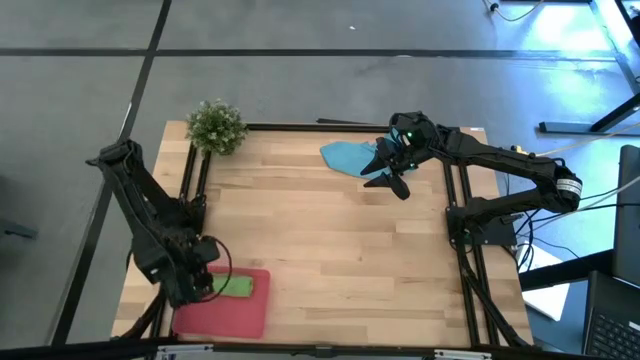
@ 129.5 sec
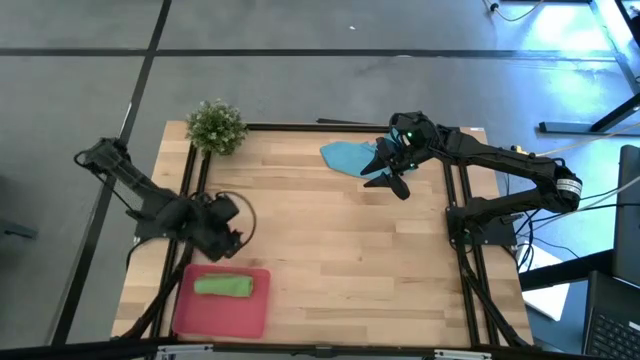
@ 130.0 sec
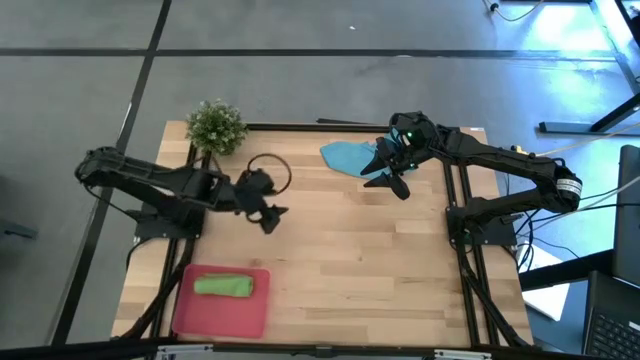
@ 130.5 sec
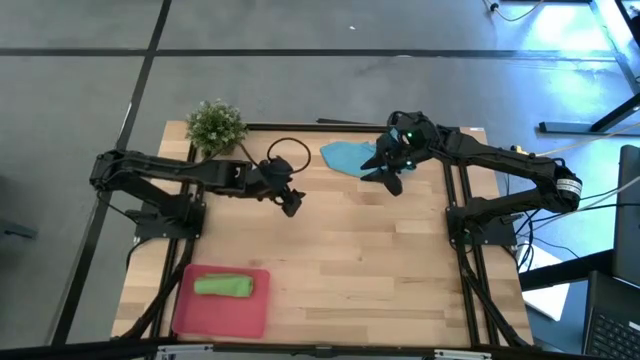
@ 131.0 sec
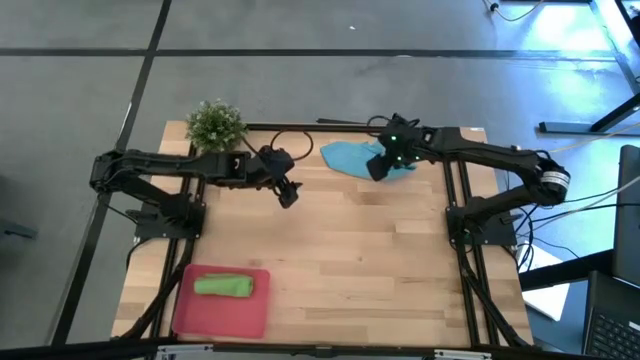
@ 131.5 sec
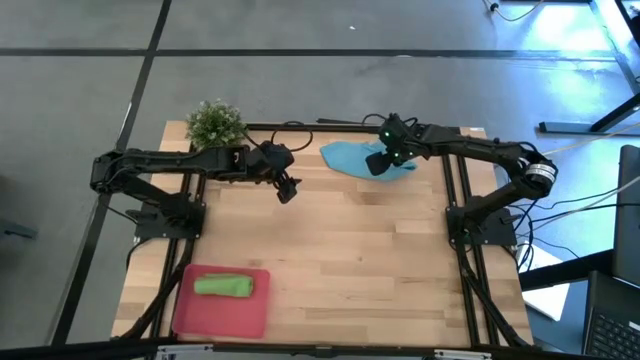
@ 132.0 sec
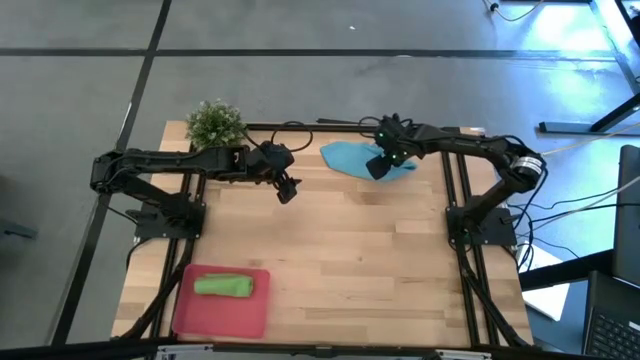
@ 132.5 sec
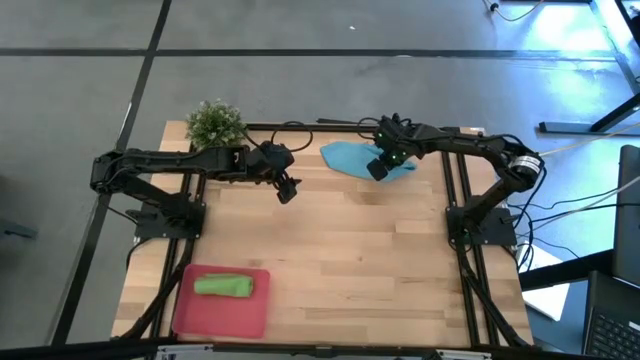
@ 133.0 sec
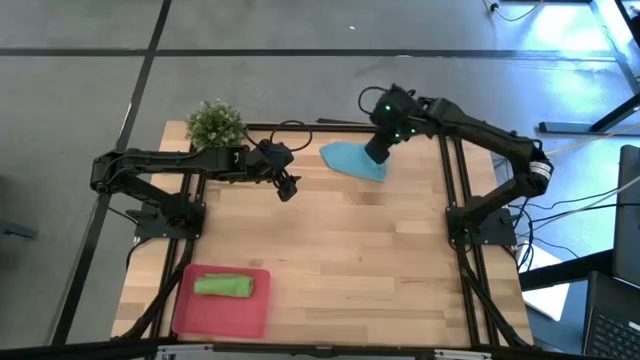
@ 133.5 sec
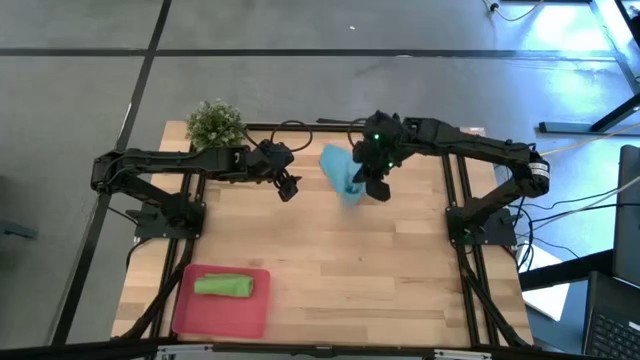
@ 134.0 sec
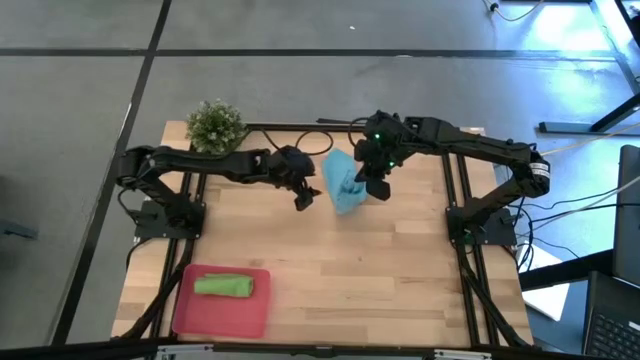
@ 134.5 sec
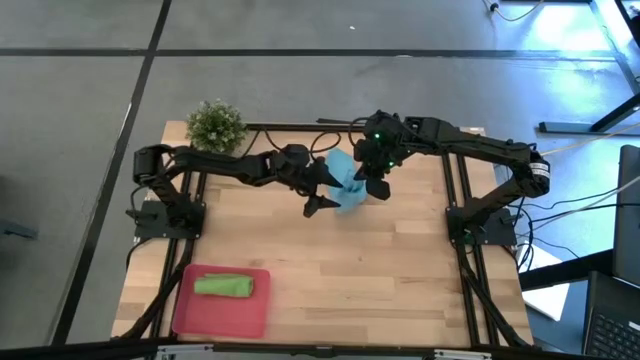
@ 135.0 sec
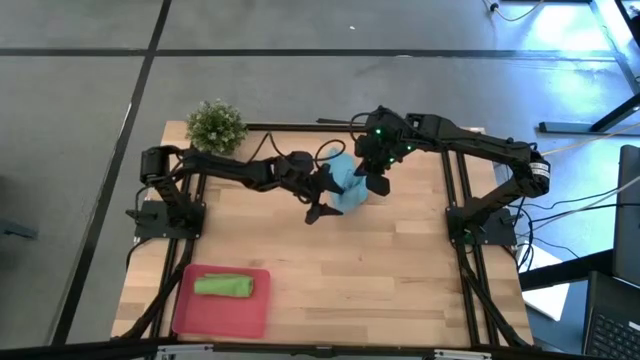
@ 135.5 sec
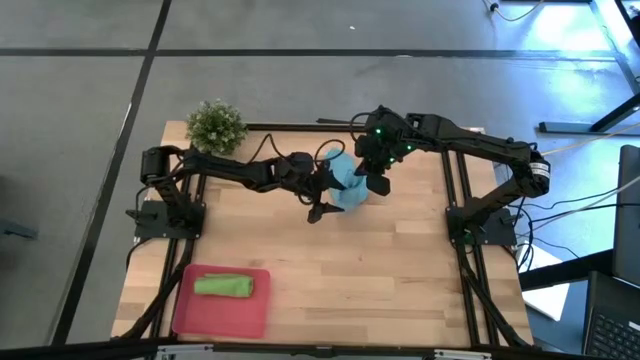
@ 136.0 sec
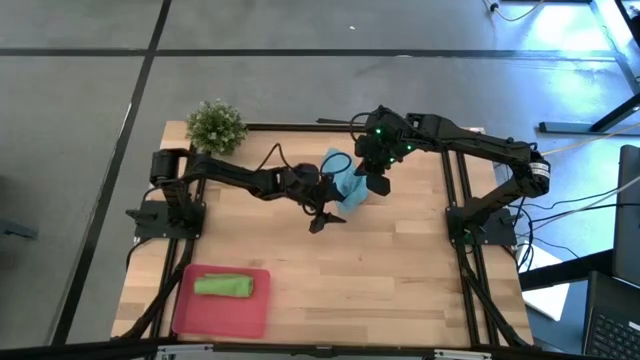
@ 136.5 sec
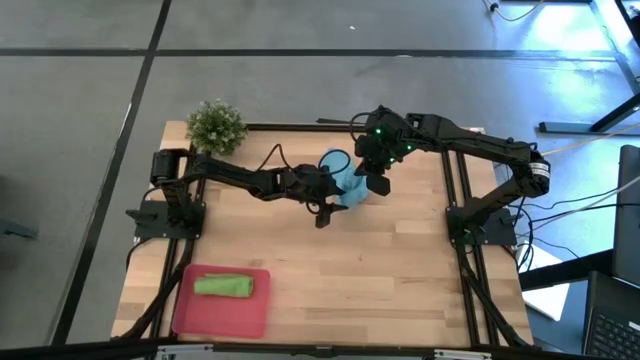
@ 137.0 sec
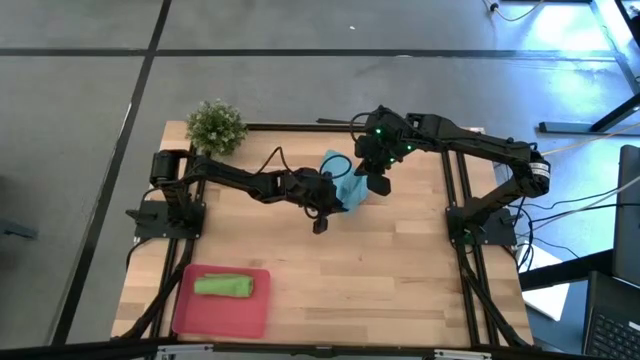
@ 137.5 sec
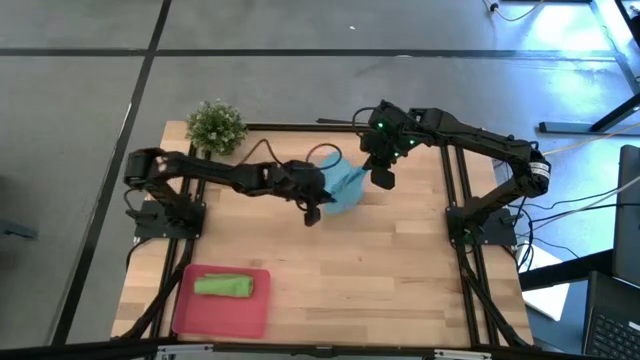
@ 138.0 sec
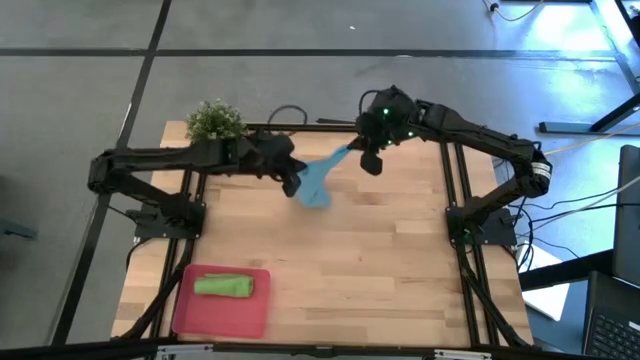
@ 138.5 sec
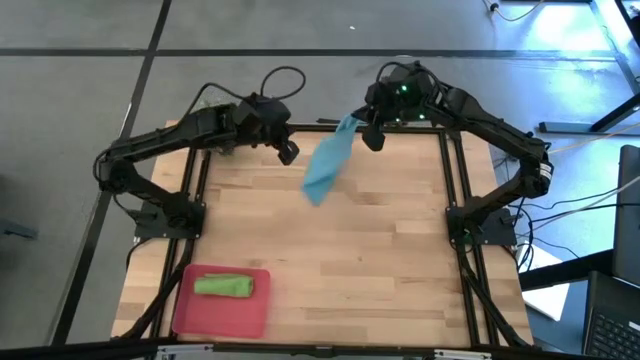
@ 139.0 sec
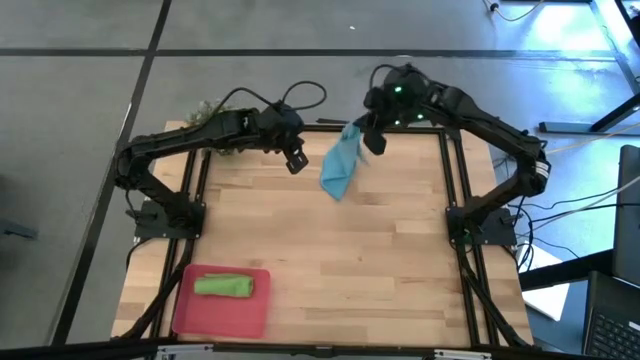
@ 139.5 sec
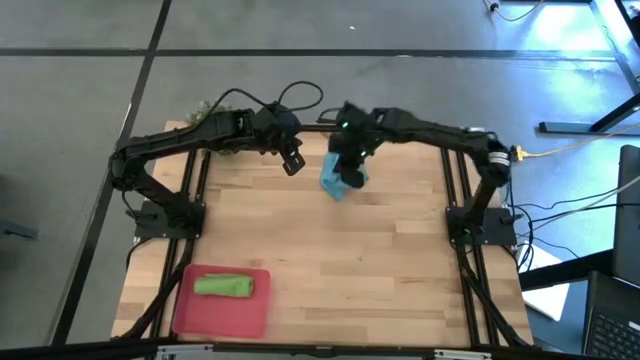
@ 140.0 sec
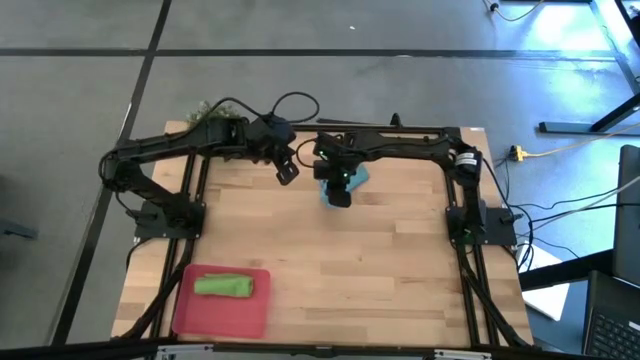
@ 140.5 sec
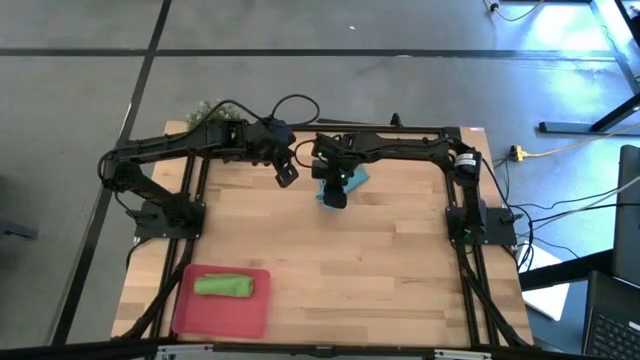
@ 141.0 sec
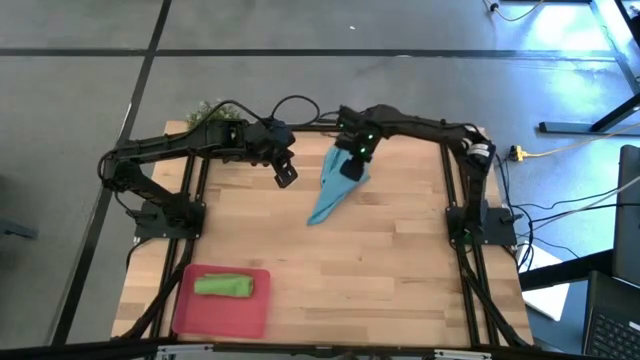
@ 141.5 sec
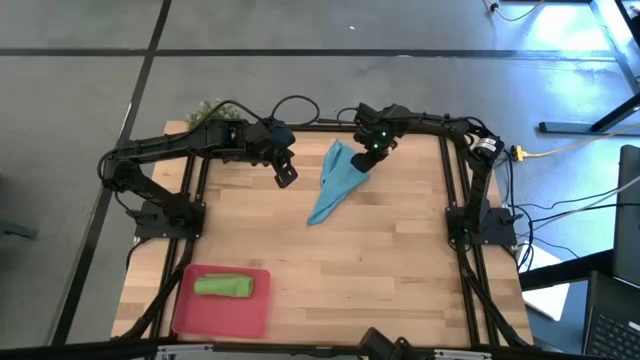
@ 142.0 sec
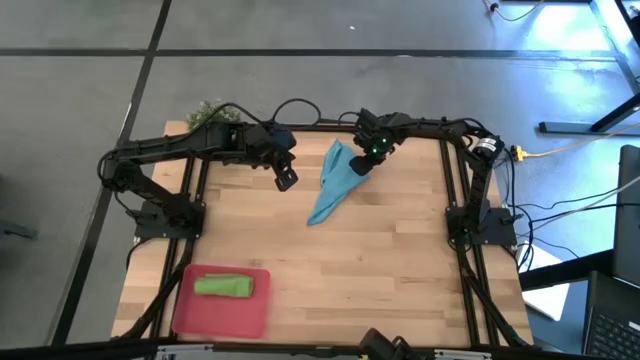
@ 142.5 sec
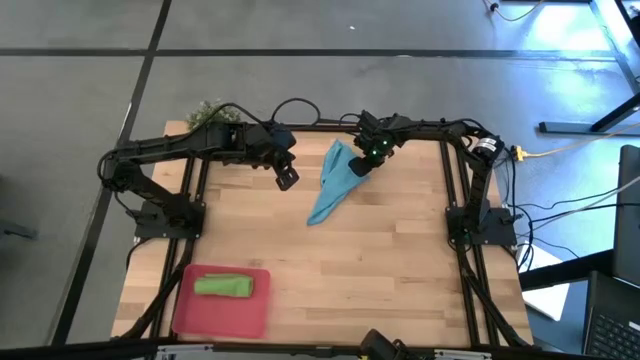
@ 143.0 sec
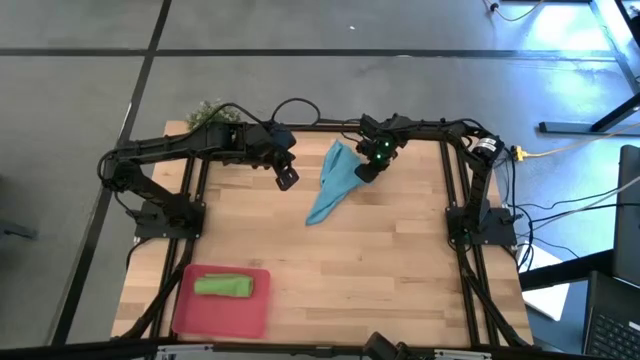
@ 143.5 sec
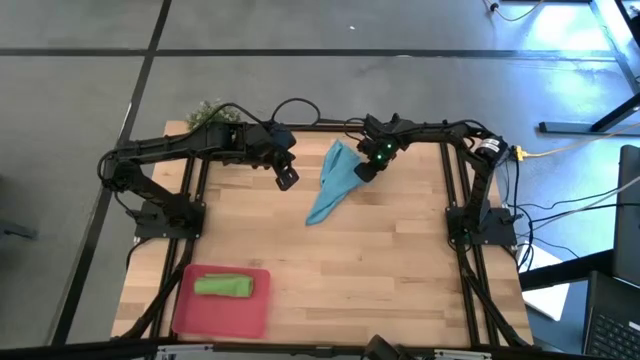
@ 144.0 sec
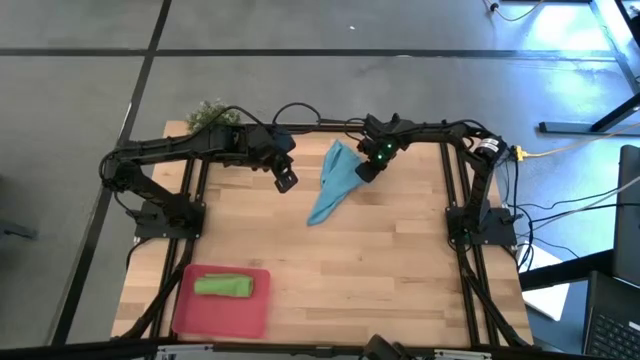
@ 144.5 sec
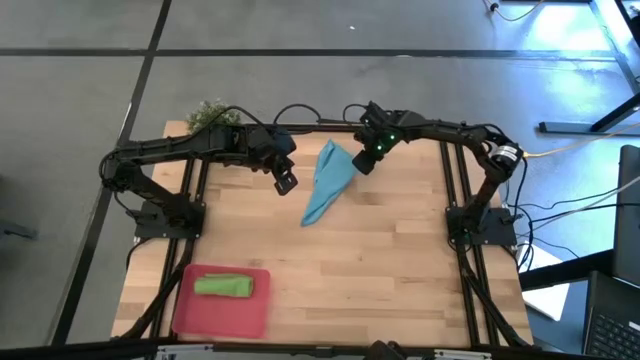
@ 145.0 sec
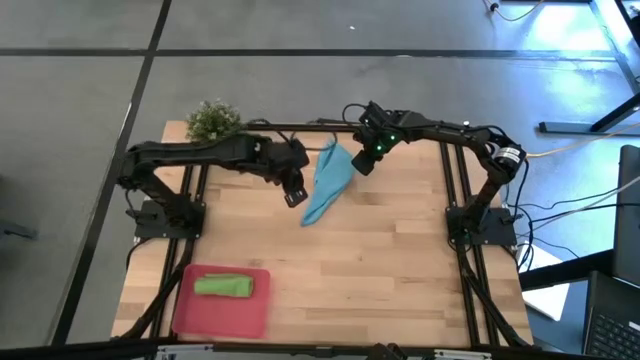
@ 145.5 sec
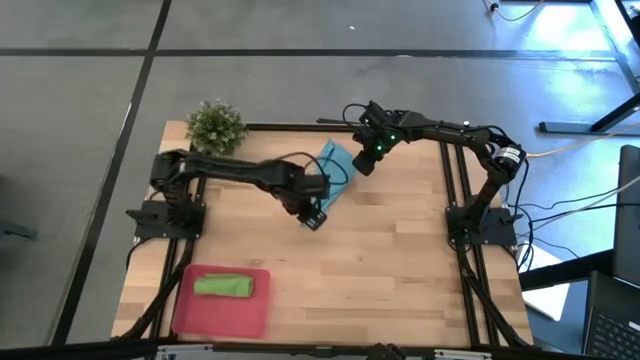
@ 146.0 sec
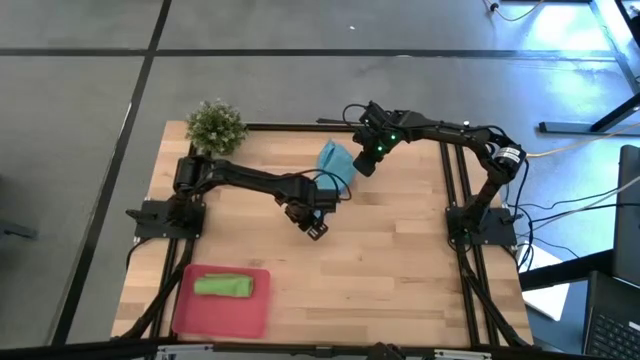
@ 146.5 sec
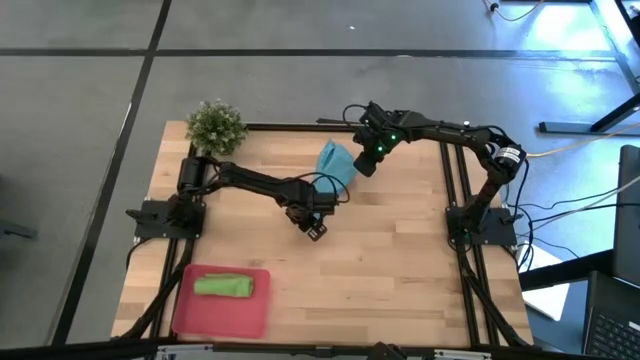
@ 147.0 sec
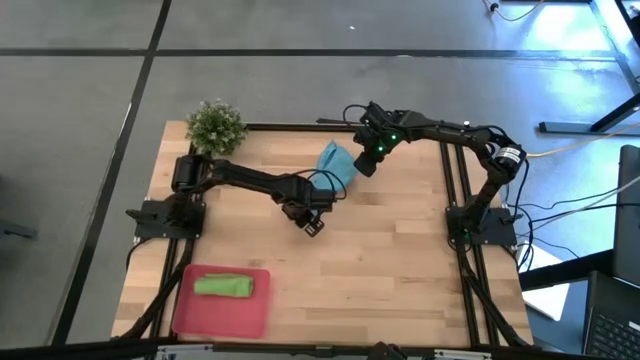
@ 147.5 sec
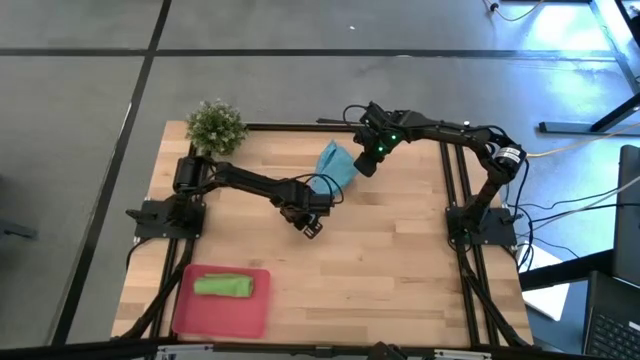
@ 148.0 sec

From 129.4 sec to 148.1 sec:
Task: Roll microfiber towels into tight, uniform cylinder then place into a basket
Roll the microfiber blue towel

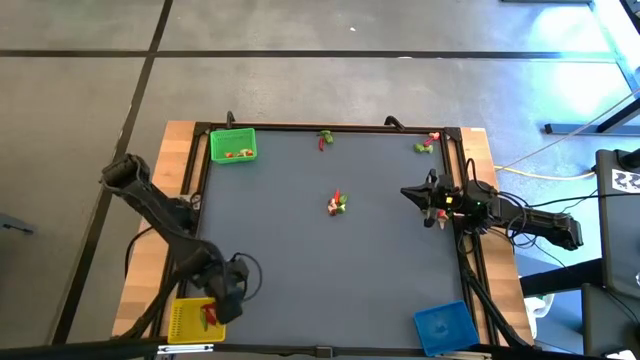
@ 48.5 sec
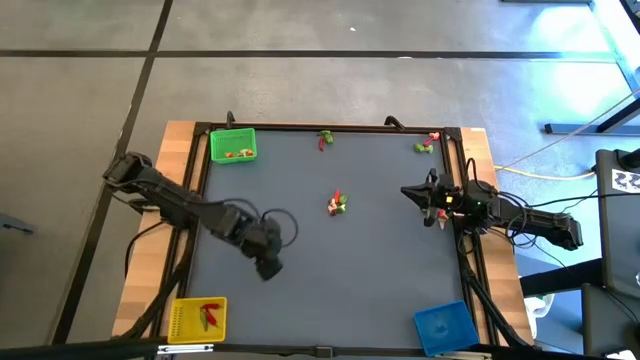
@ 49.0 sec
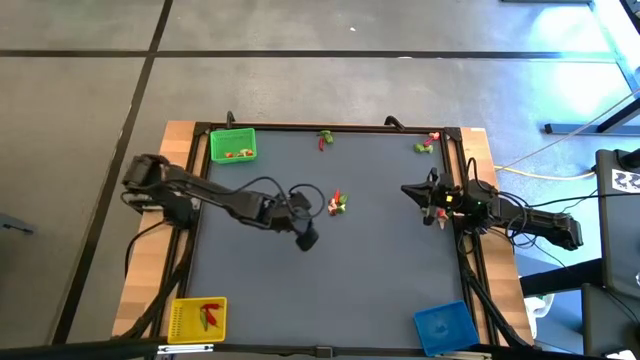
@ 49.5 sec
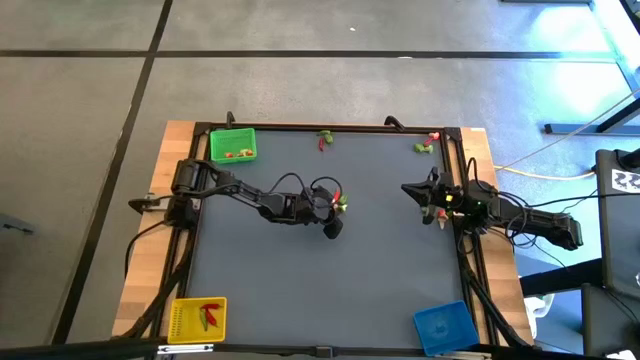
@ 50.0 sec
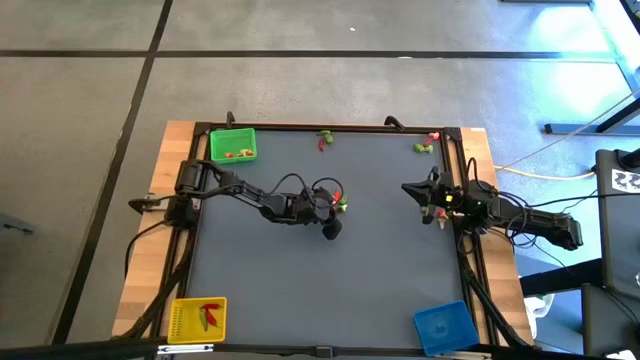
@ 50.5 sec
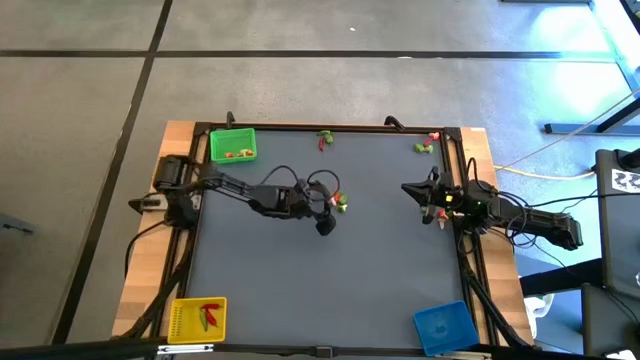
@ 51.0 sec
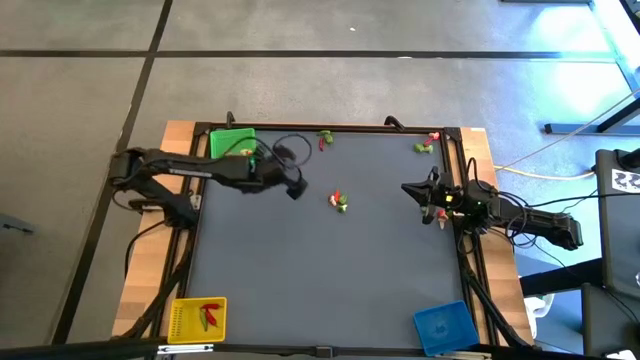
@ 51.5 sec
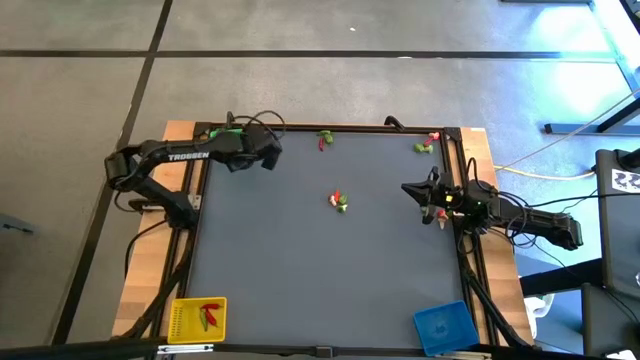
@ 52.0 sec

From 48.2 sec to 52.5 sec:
Task: Sort produce into baskets
Put the brown mushroom into the green bin
